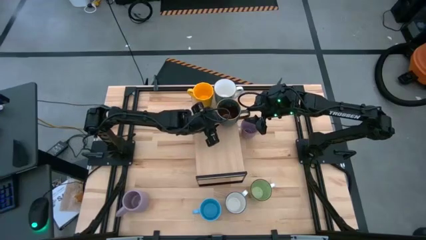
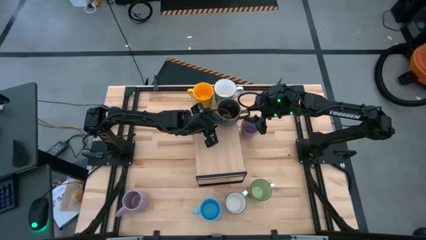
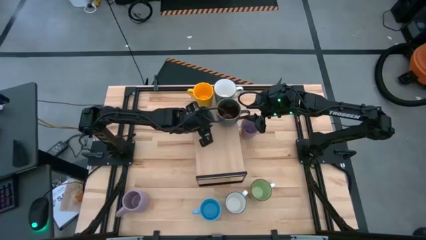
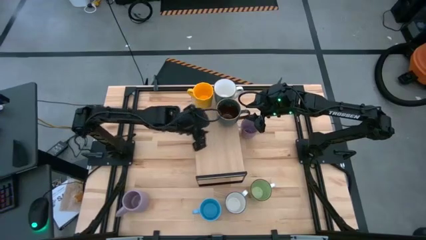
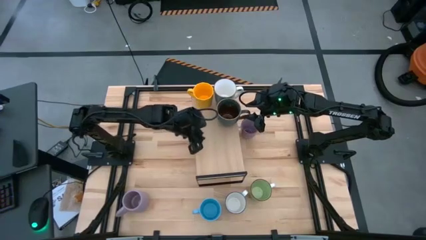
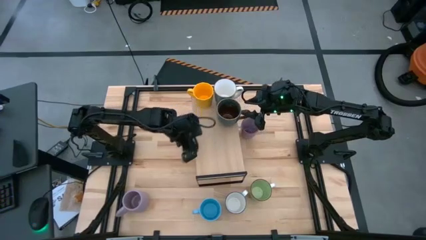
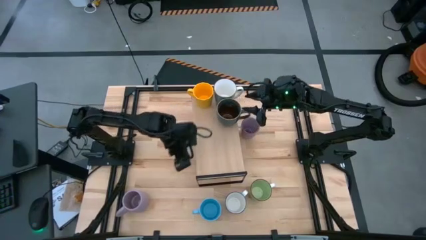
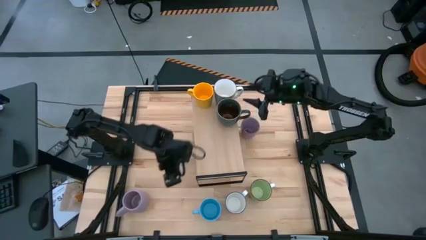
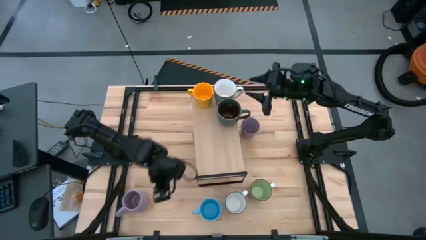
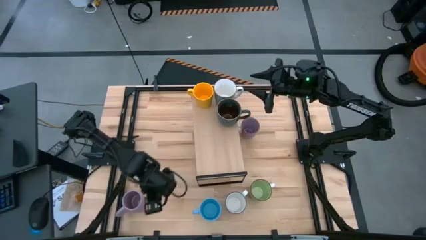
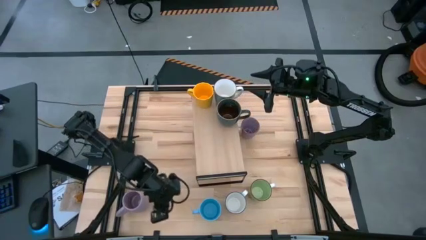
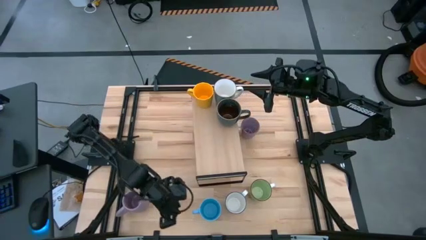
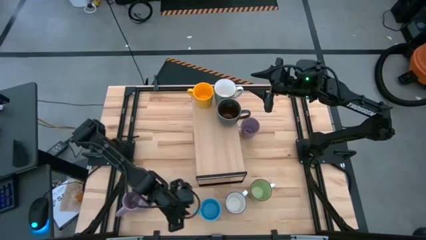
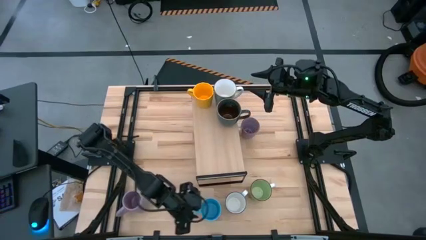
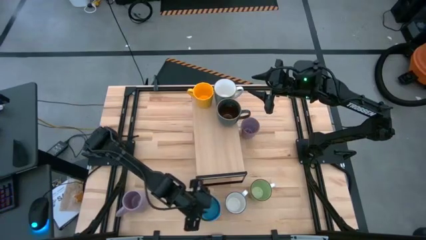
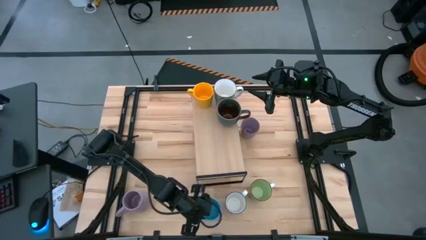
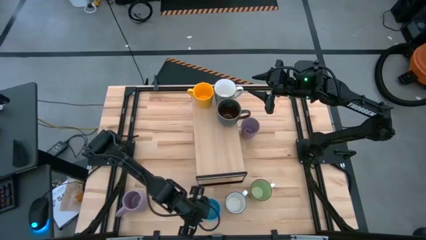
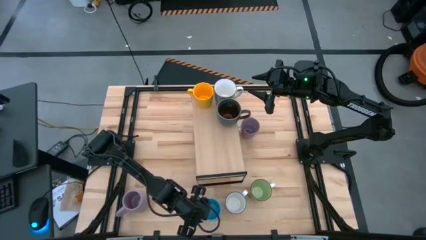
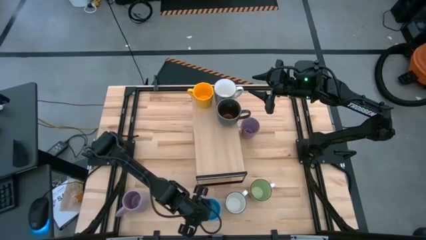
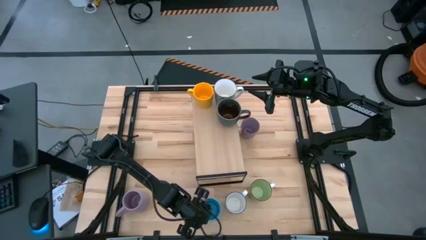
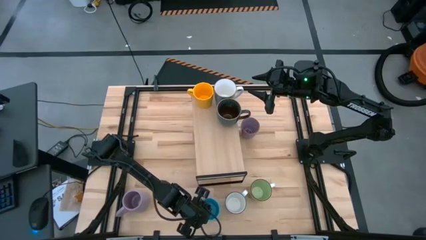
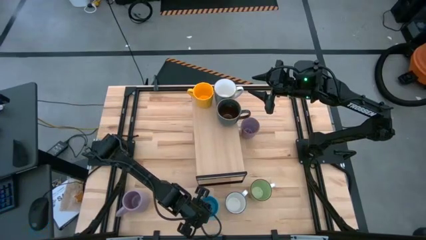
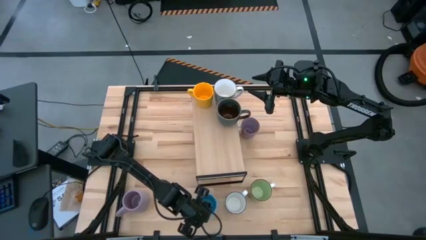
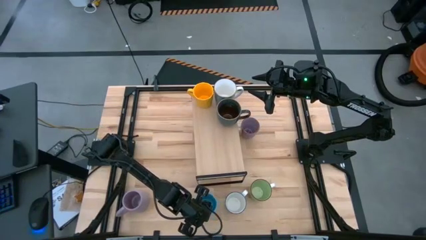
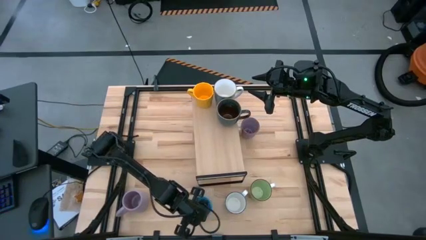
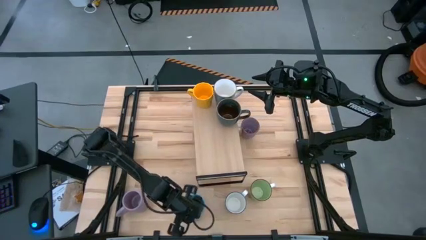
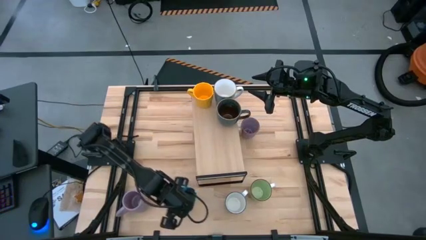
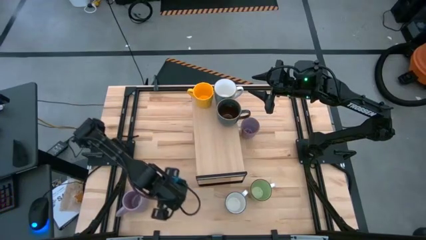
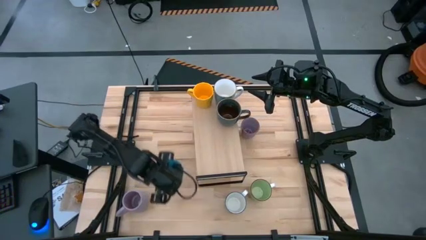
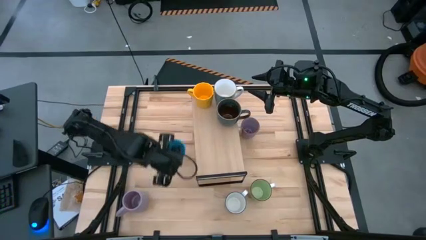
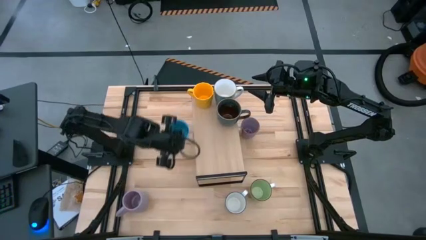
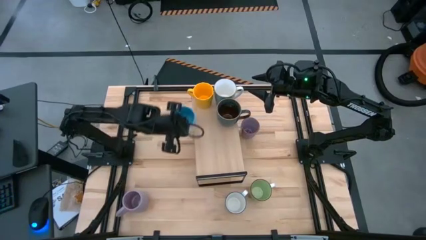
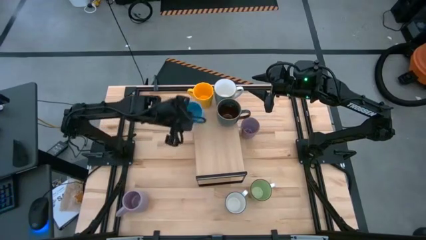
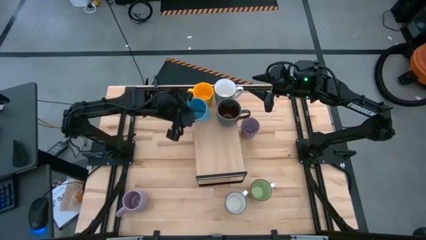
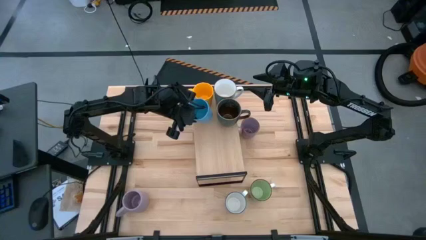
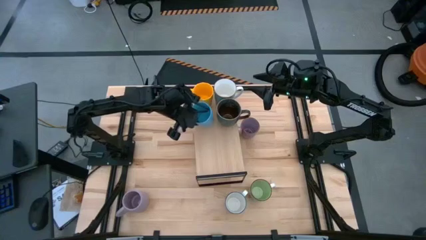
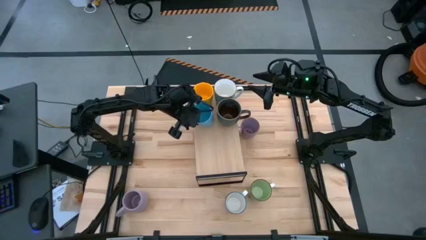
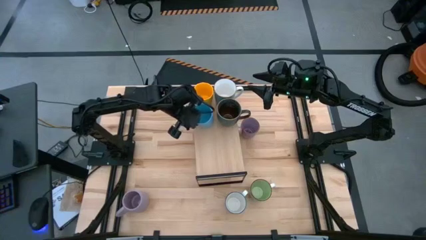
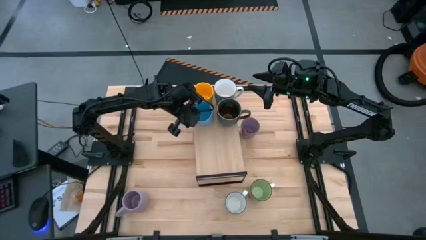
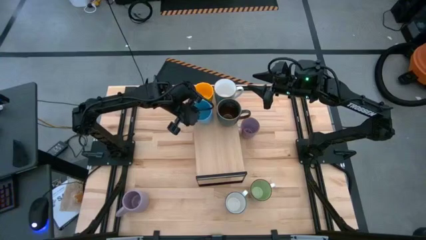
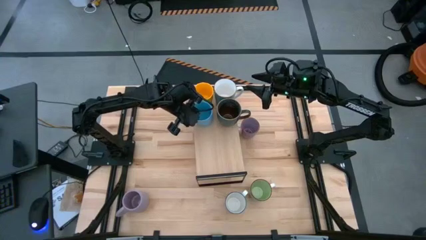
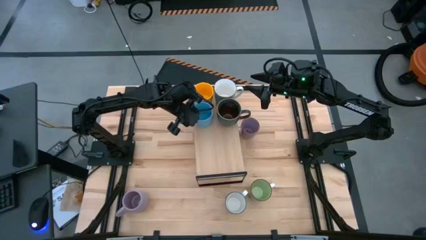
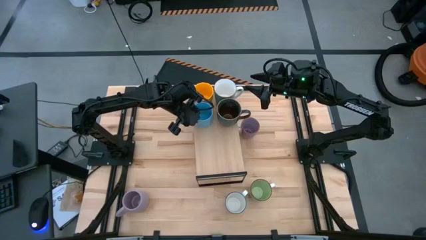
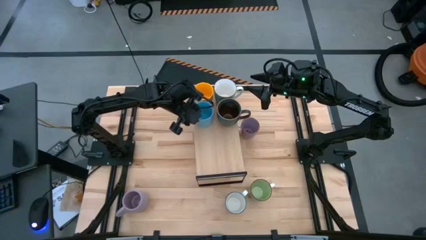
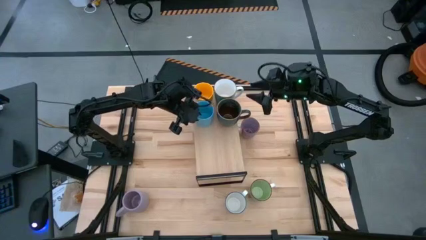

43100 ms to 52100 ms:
Task: Place coffee mugs
Put the blue mug on the shelf

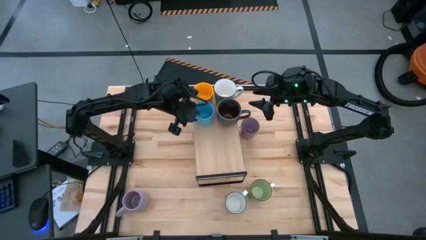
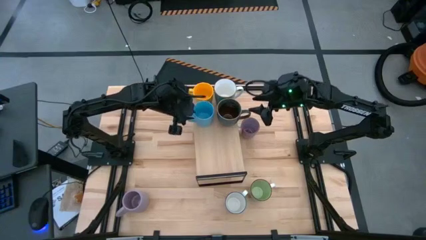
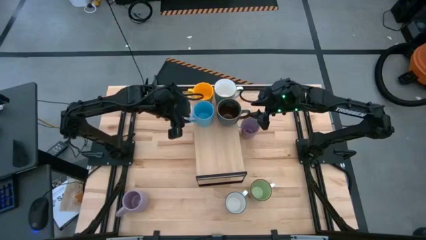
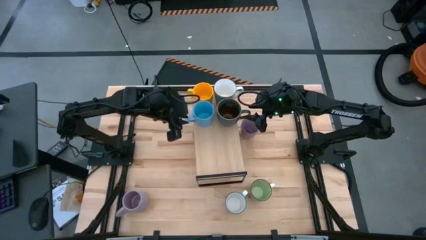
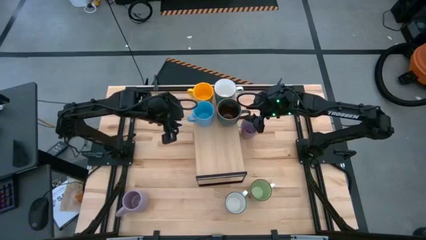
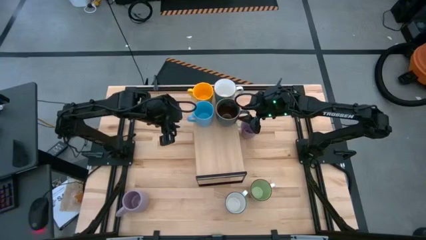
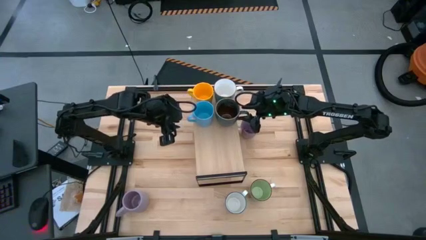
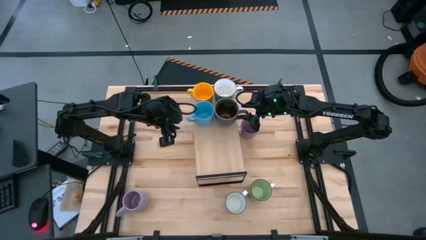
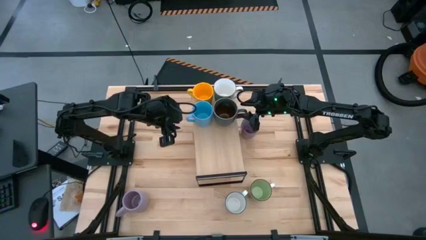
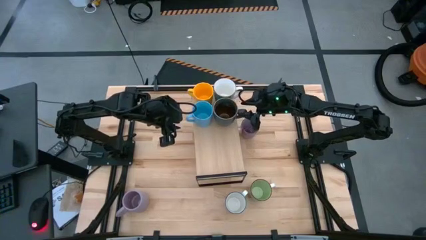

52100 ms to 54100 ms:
Adjust the dark blue mug on the shelf

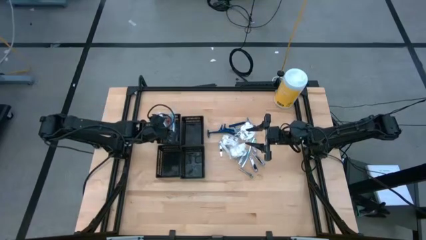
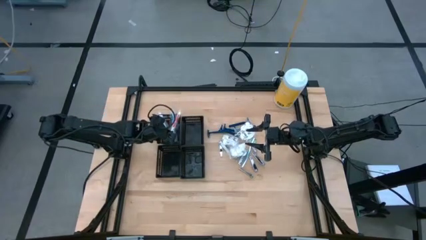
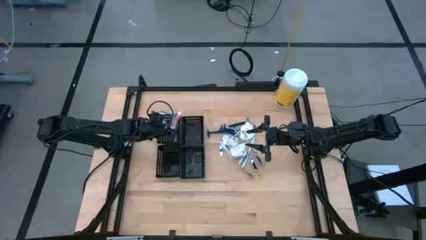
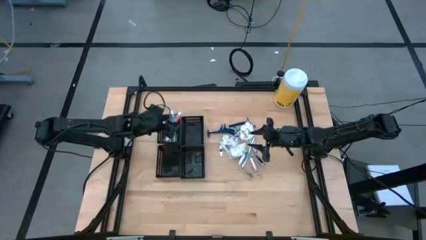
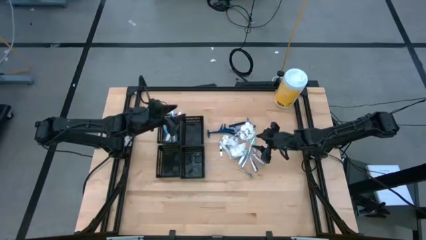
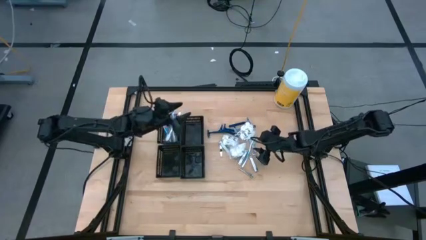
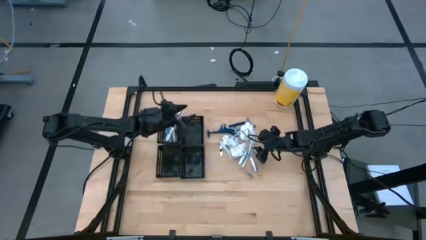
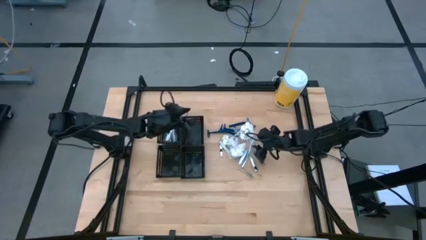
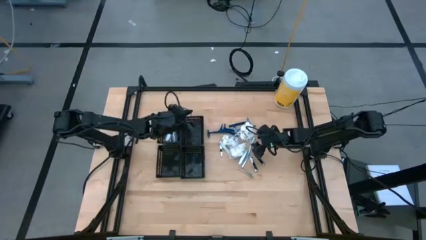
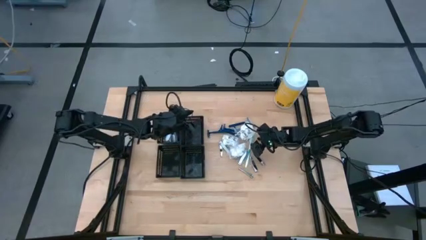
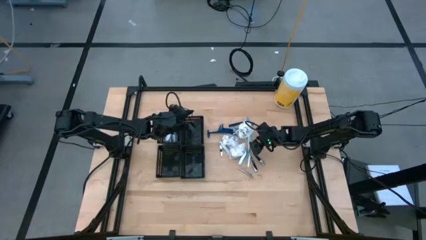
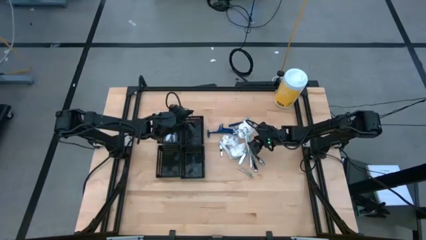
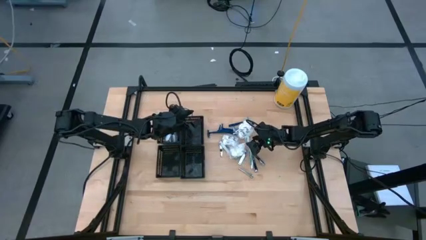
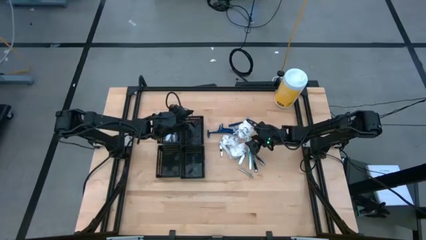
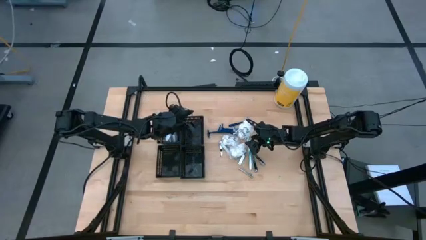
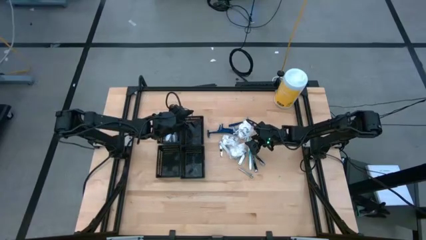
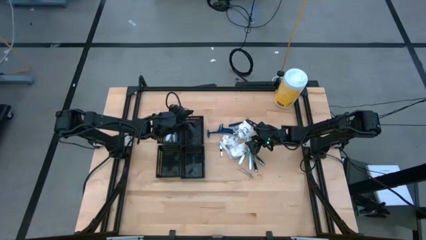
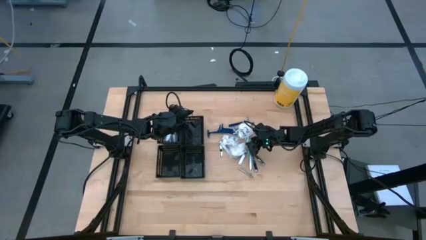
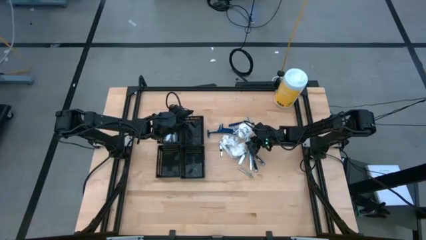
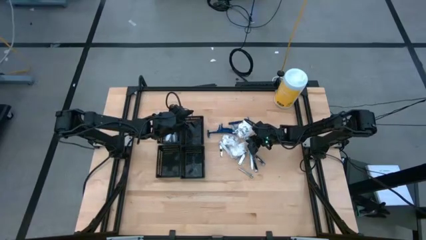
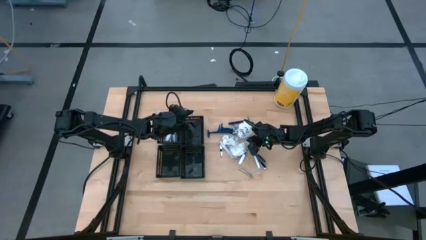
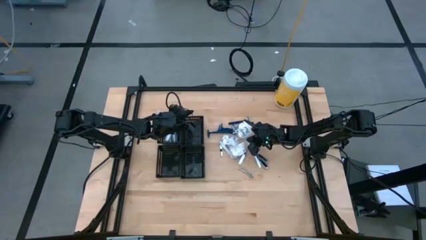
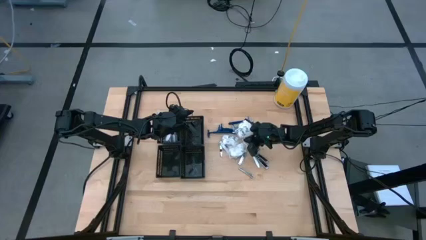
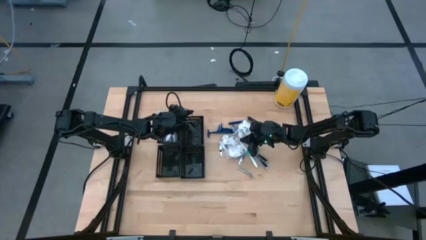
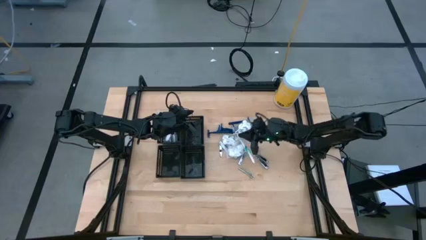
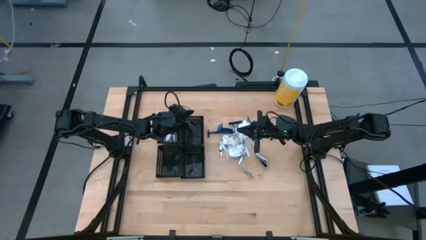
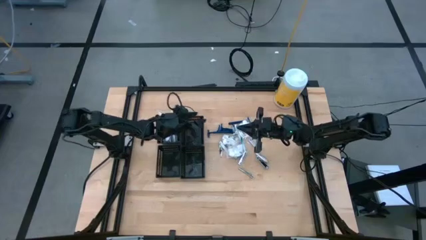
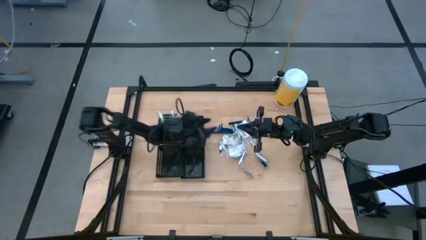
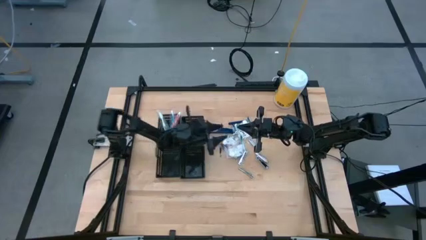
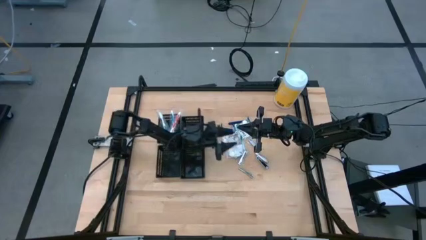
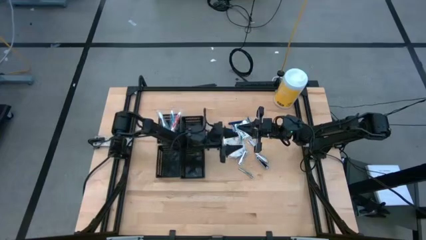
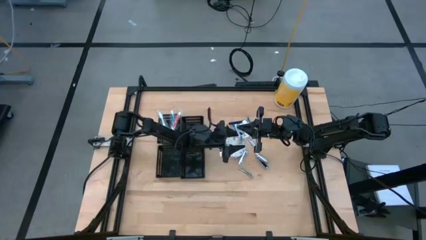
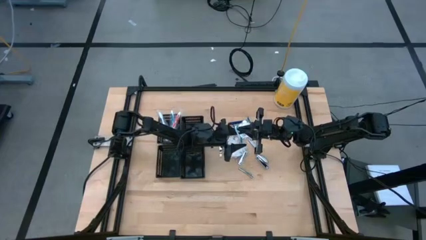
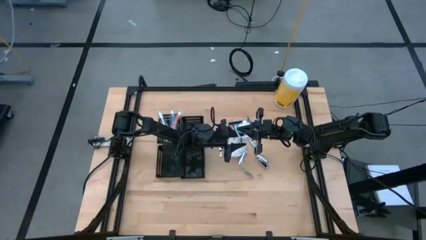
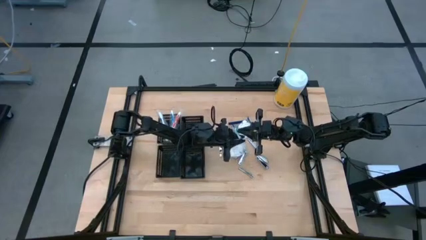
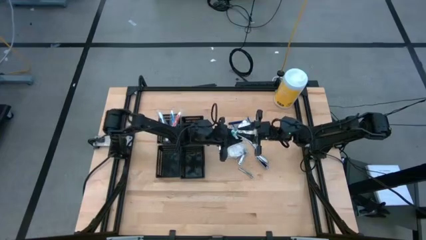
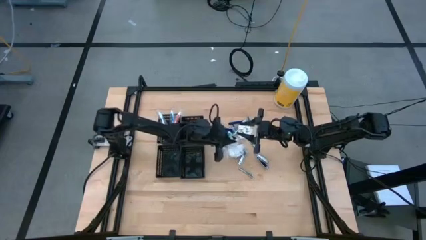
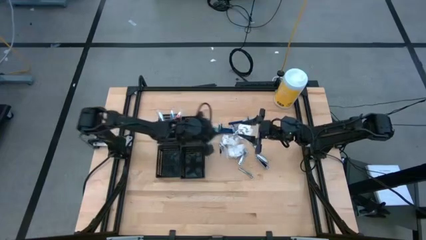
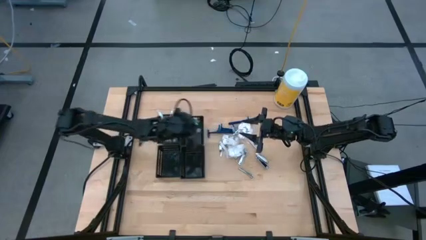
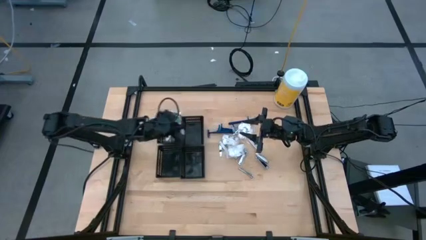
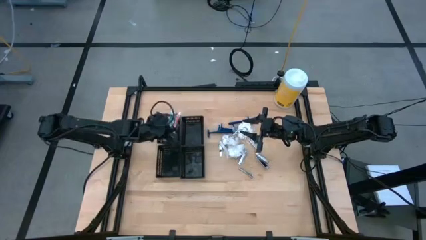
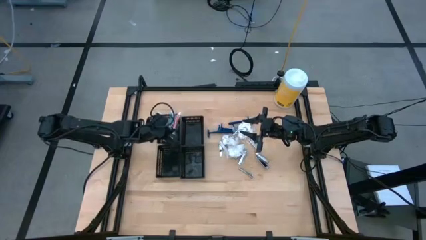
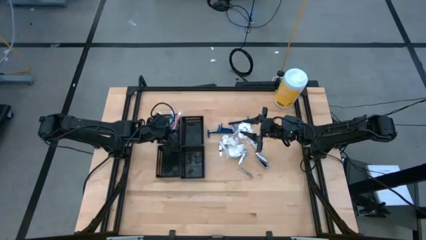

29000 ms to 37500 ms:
Task: Pick & Place Travel size toiletries
Put the green toothbrush into the top left black bin
